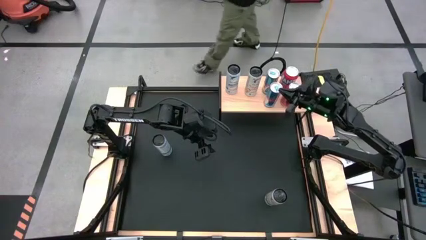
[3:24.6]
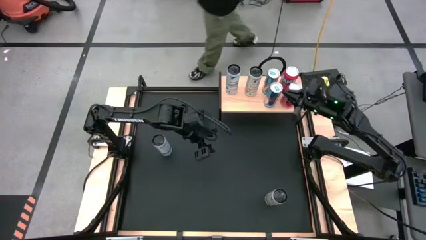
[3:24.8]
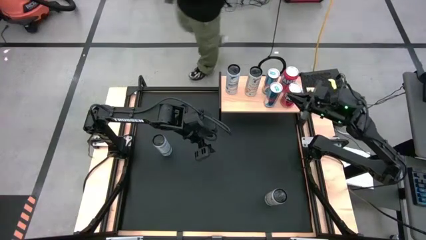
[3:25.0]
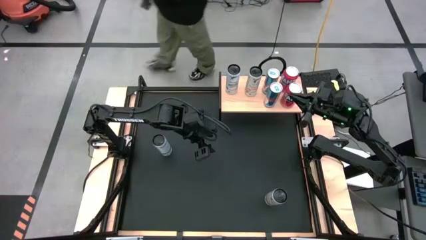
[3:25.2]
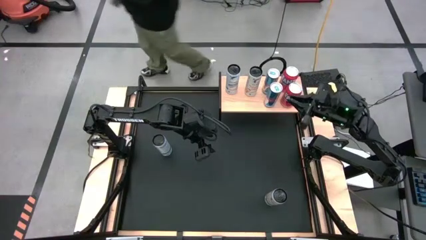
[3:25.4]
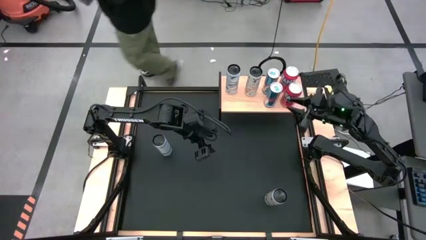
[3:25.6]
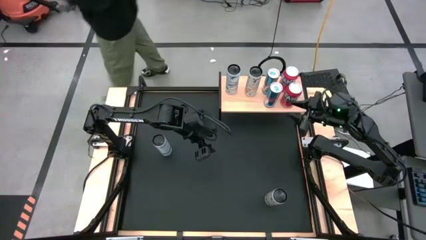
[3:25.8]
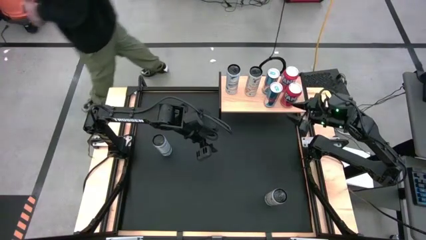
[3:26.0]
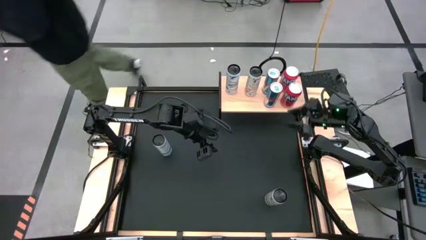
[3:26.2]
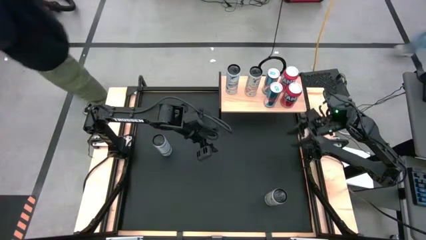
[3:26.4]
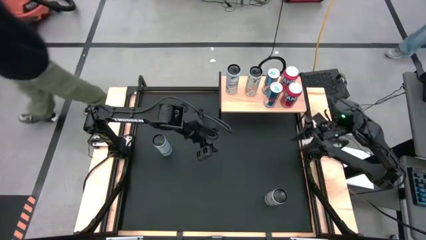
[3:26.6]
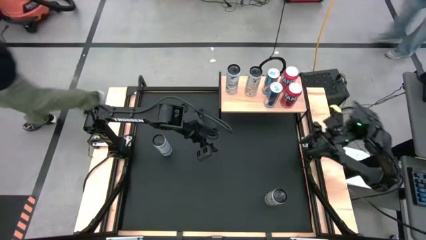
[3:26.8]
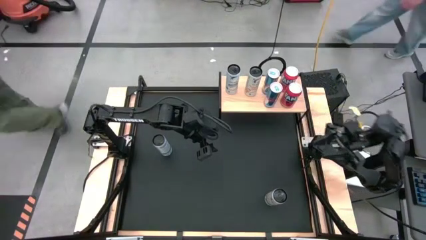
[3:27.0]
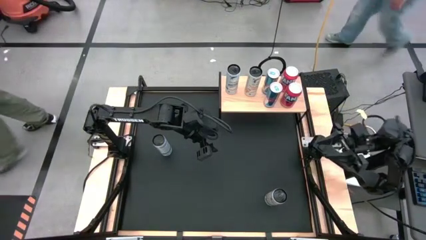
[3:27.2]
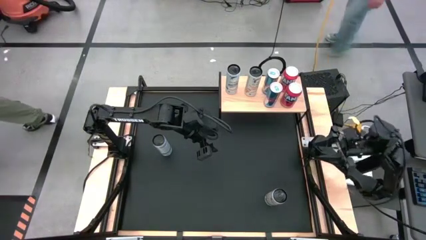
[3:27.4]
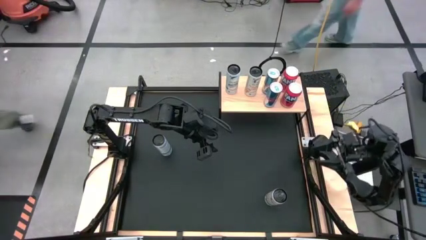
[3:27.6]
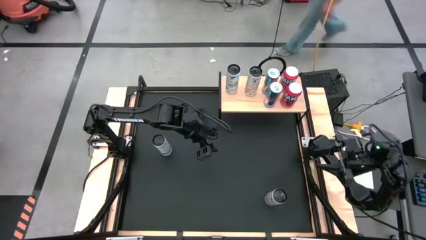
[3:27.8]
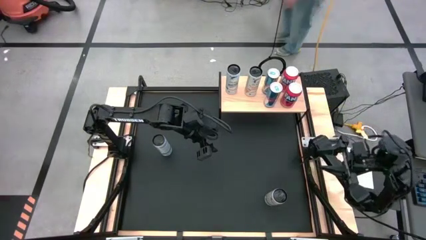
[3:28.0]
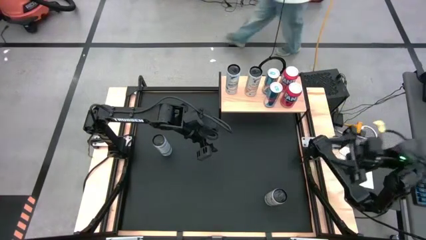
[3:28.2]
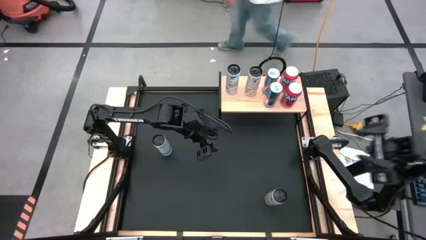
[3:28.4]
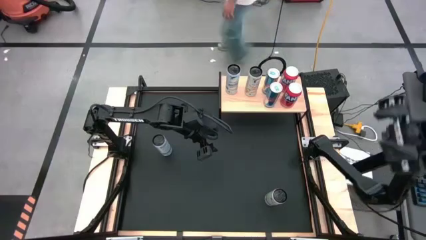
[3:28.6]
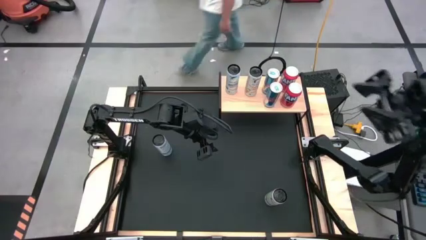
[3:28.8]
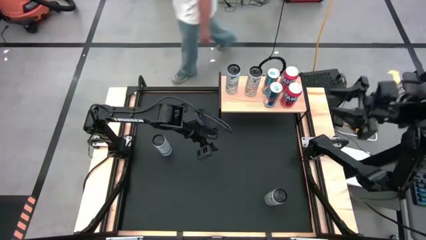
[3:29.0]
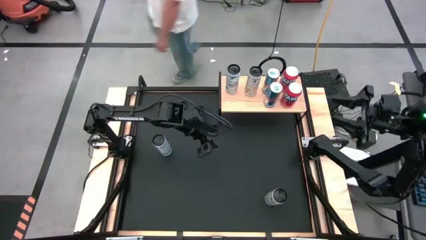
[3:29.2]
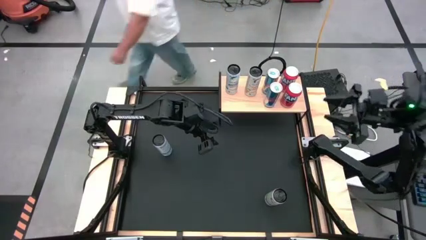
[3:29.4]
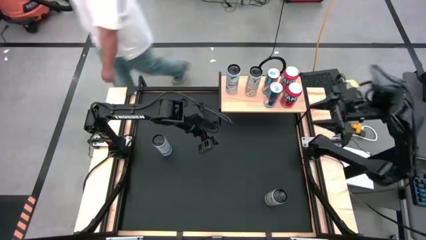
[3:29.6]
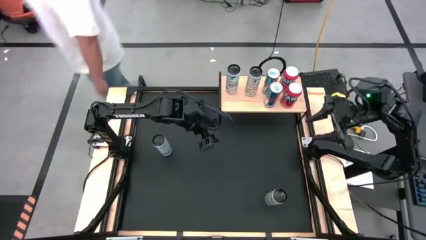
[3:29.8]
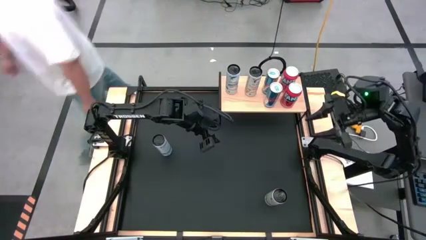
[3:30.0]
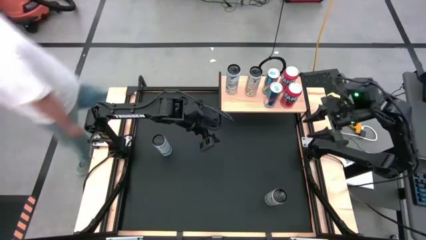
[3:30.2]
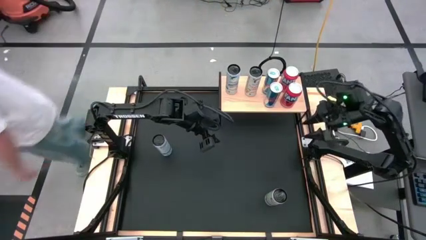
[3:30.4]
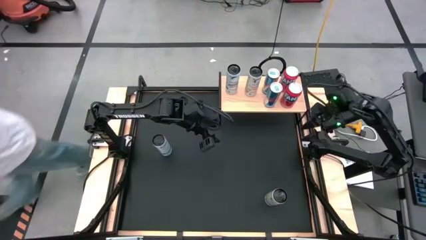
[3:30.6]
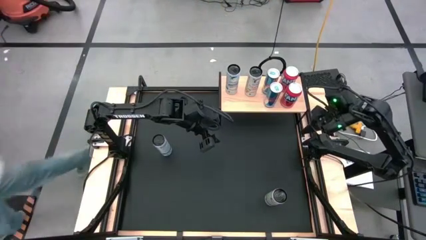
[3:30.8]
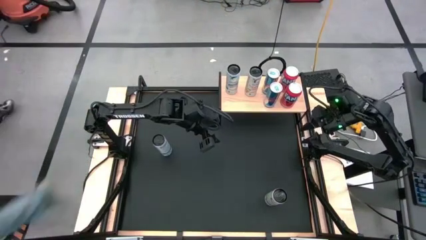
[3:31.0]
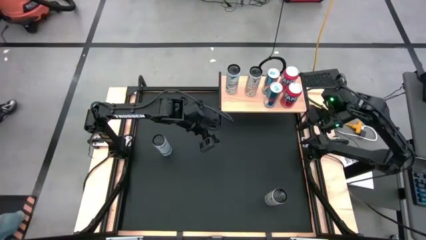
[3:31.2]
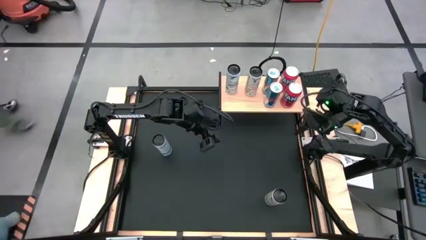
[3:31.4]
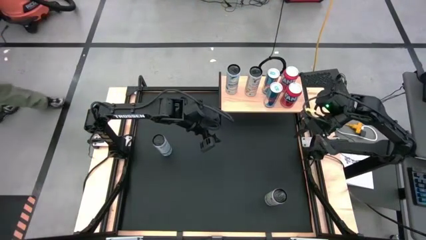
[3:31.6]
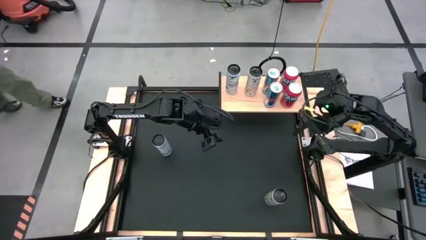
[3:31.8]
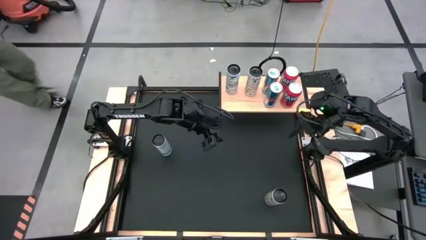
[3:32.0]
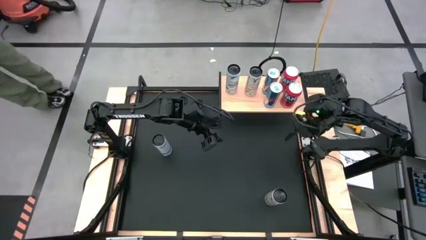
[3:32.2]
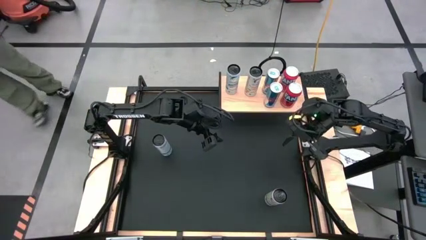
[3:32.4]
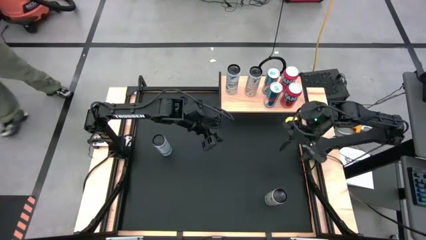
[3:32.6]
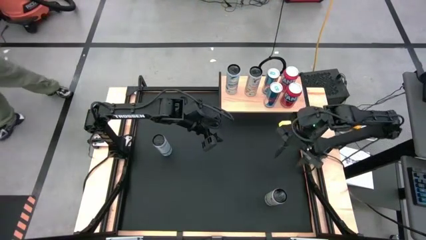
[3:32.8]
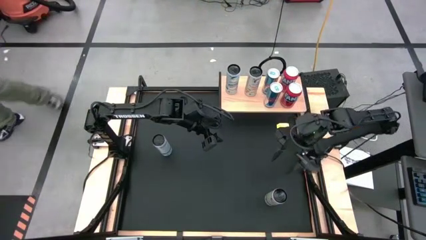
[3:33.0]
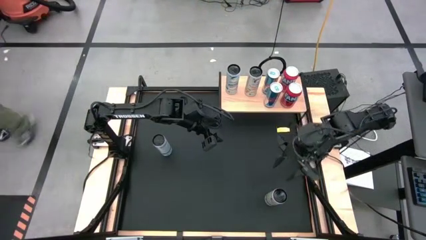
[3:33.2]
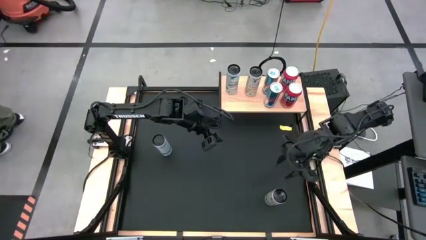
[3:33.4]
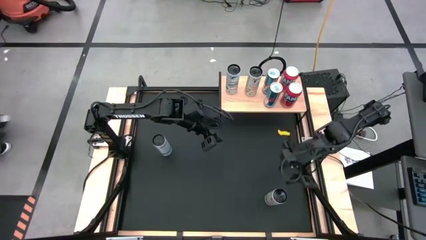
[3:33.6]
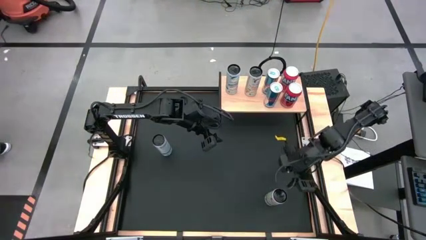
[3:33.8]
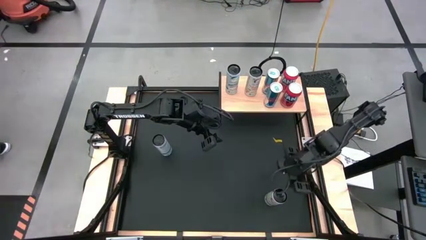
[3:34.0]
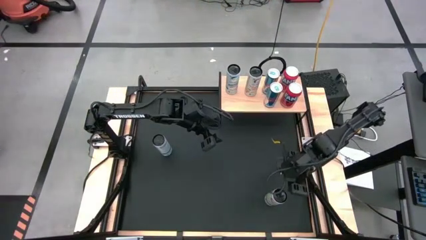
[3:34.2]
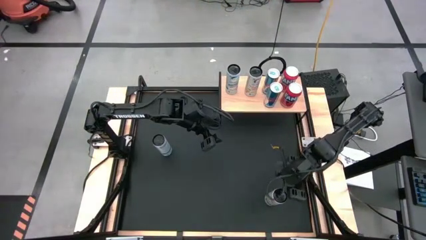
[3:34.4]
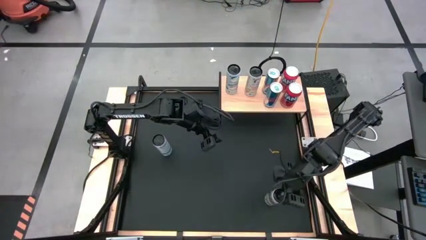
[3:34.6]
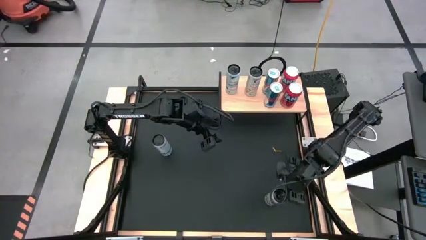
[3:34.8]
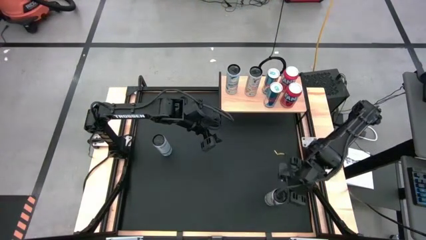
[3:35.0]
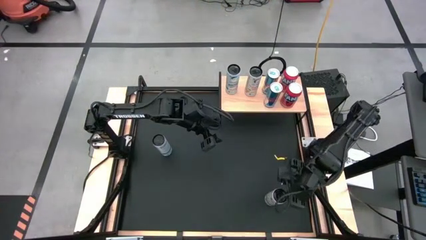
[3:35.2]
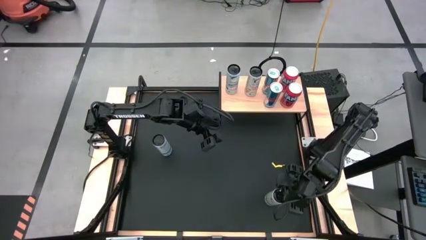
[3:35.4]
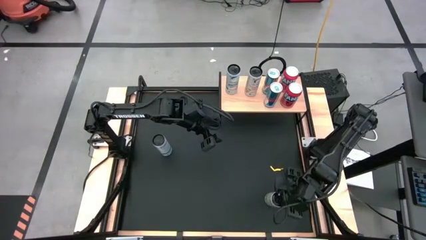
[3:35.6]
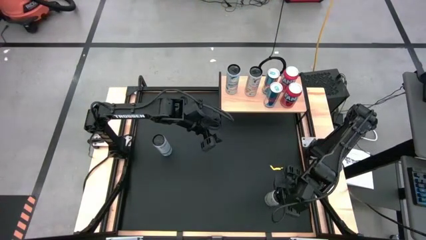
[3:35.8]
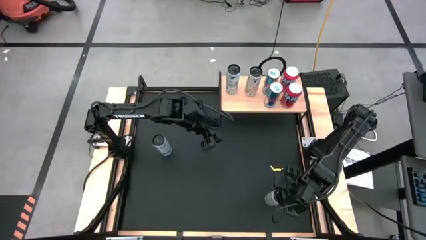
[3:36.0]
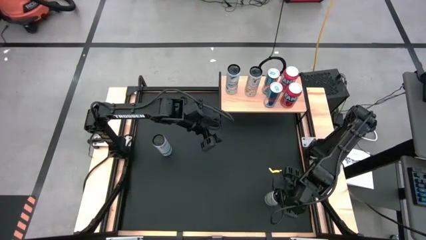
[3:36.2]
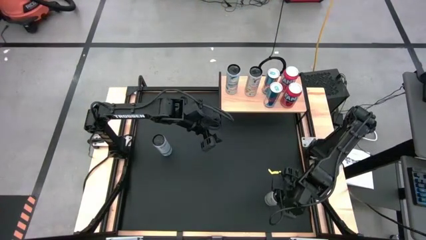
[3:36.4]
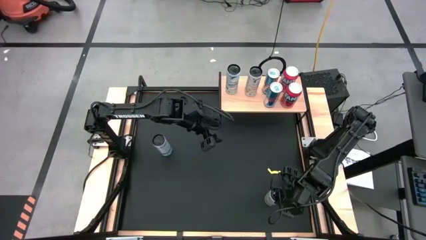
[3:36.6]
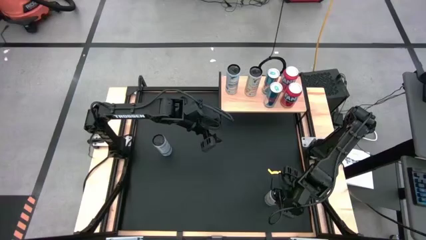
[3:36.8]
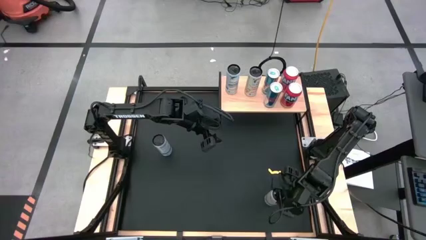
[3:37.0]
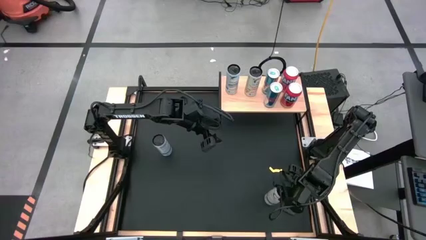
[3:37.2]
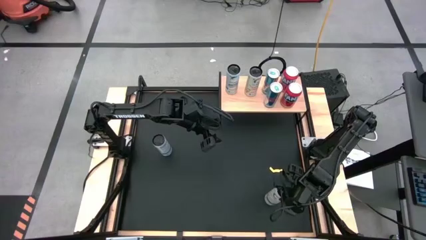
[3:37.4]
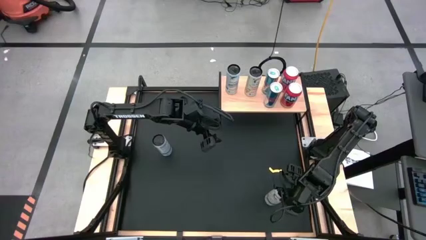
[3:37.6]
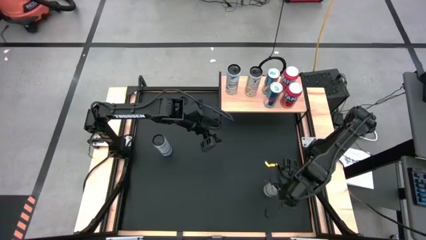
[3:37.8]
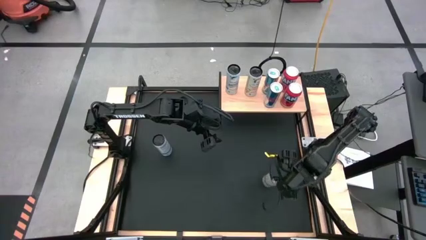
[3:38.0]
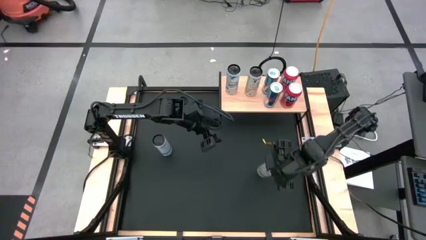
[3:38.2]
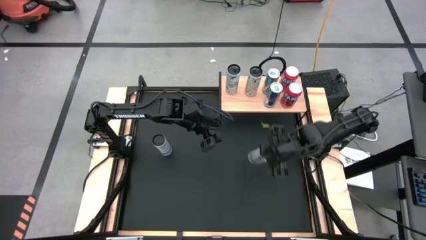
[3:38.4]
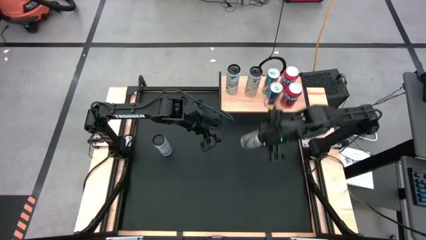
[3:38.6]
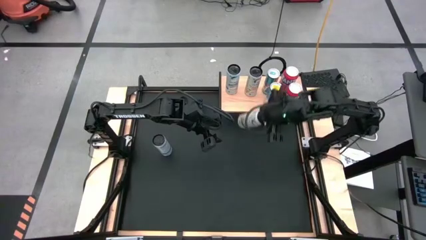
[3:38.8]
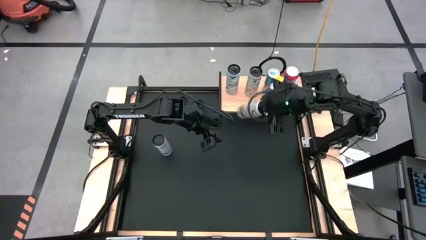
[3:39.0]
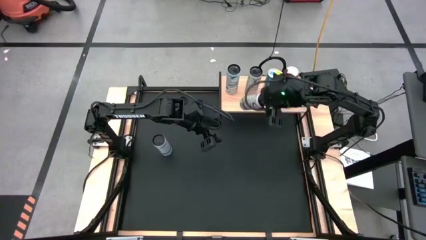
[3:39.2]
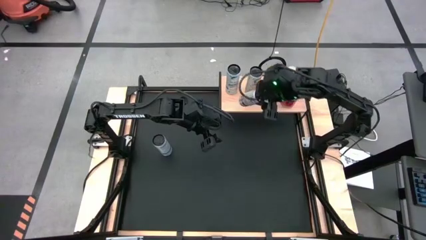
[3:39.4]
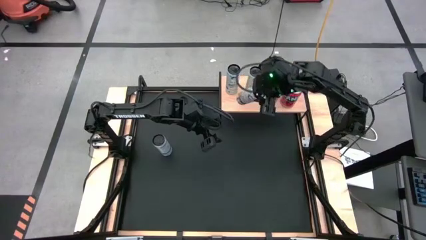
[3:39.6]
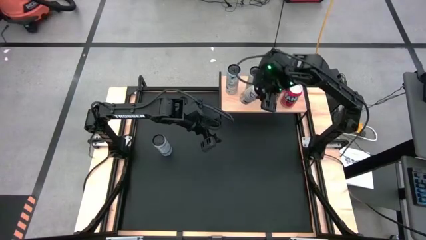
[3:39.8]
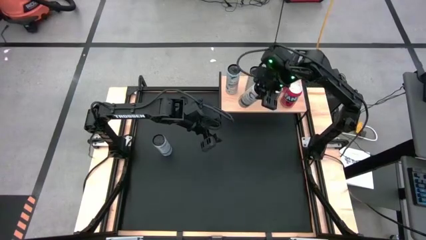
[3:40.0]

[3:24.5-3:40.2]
Task: Place canned beverage on shelf
Put the white yellow soda can on the shelf aligned with the white yellow soda can
